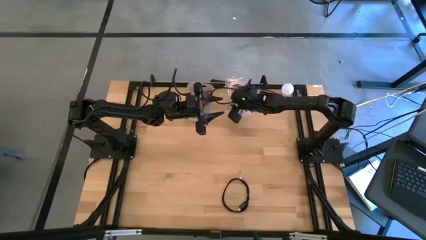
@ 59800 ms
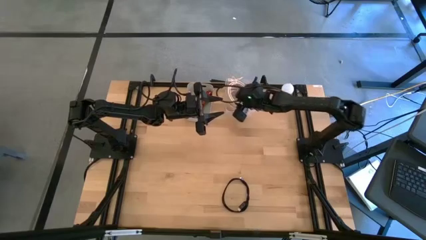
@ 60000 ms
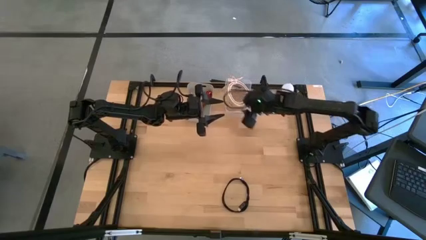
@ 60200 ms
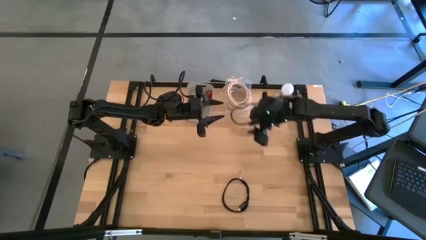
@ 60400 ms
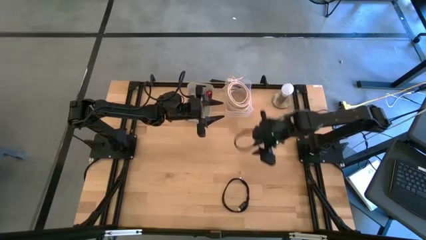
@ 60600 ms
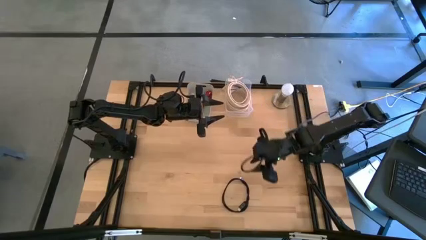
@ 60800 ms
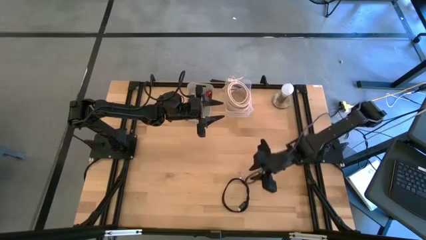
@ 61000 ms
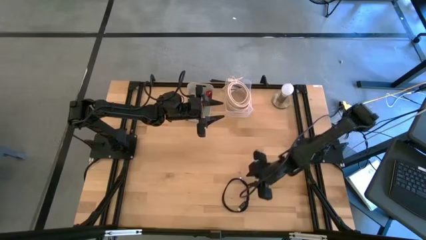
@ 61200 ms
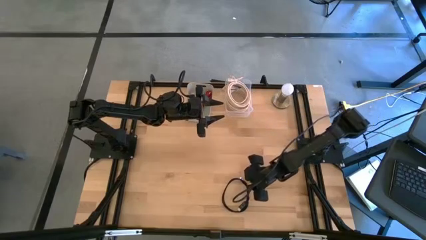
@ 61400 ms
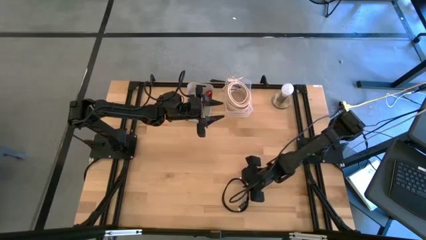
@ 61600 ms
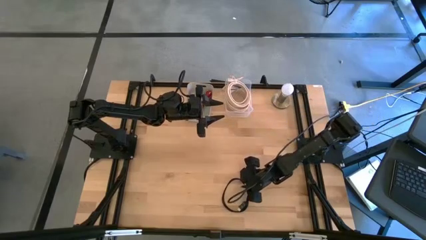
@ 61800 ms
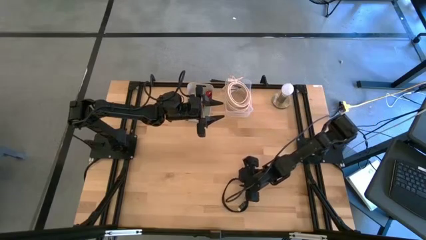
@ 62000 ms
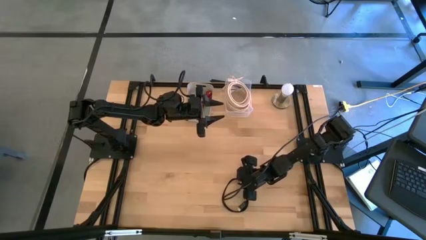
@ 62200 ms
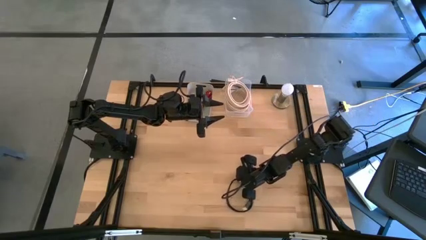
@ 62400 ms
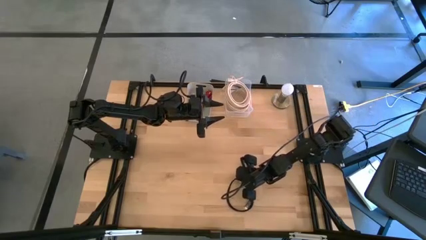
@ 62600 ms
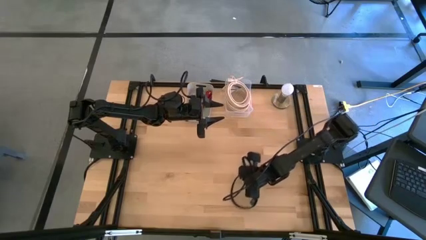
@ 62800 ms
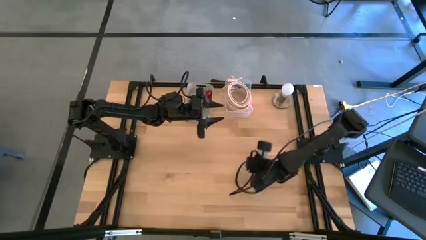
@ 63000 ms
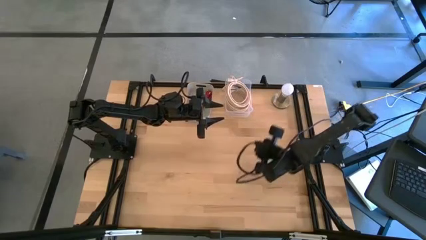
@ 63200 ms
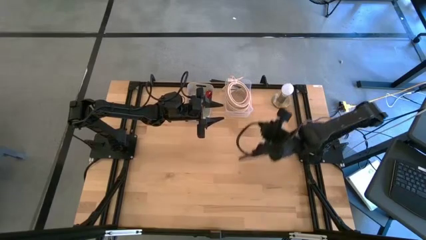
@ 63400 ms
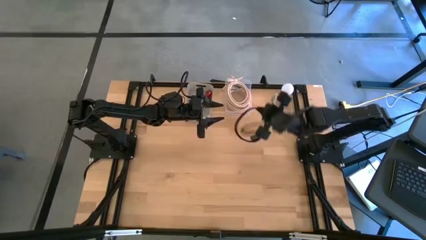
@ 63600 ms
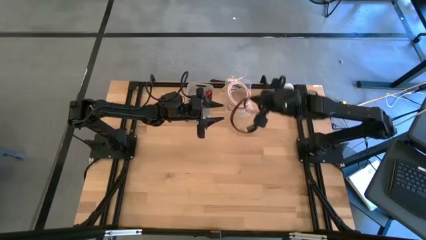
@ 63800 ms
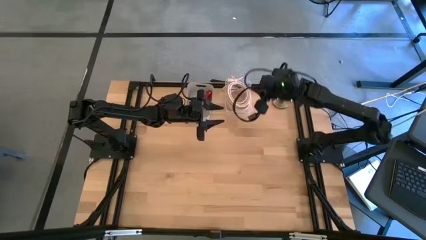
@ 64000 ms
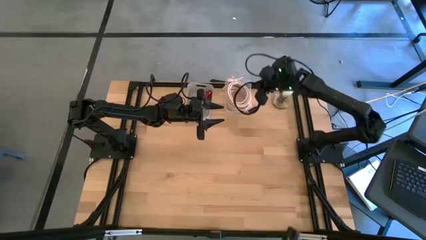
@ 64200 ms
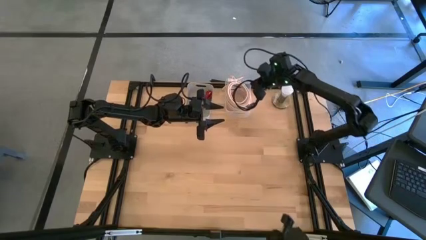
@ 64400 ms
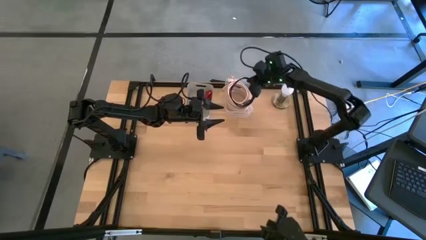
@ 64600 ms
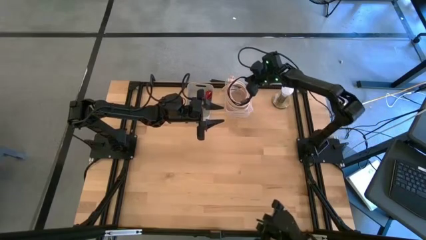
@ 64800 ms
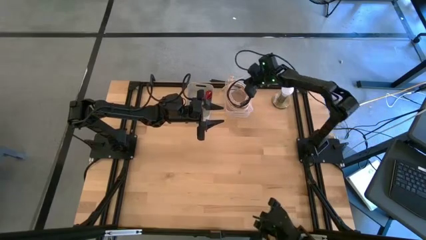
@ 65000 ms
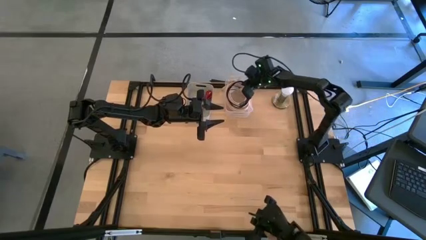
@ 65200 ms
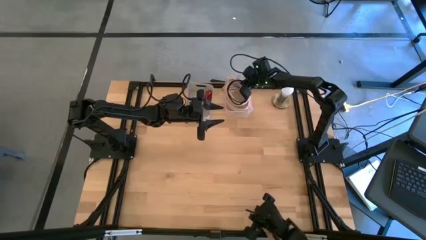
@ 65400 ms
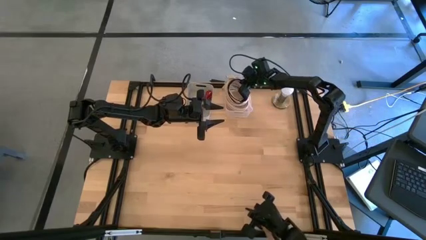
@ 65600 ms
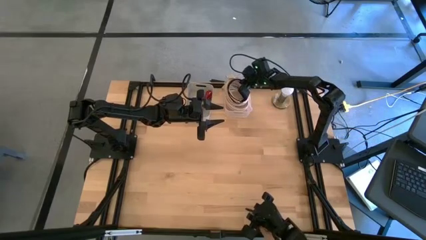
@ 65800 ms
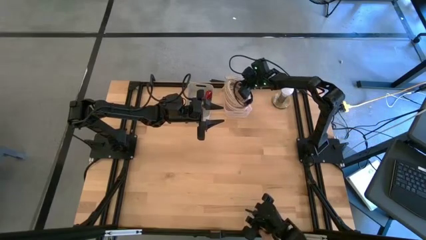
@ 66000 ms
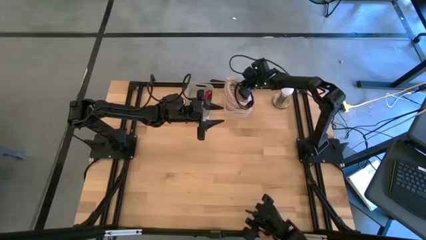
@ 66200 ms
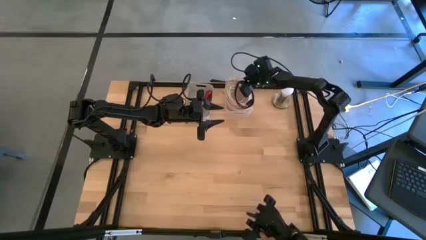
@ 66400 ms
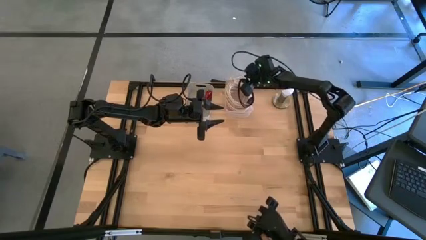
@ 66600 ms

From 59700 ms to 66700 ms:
Task: Pick and place USB-C Cables
Put the black USB cable into the transparent bin

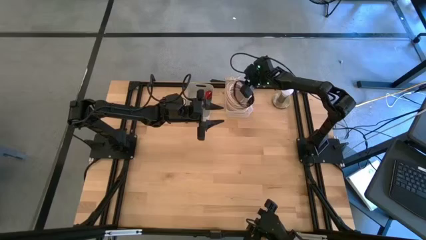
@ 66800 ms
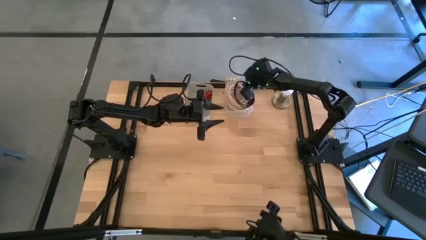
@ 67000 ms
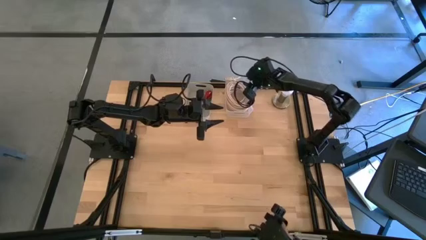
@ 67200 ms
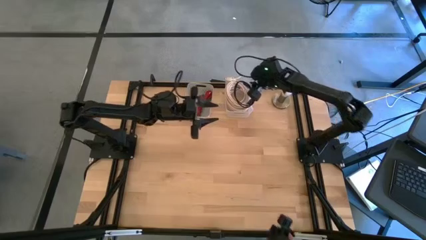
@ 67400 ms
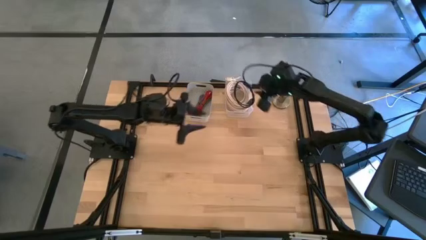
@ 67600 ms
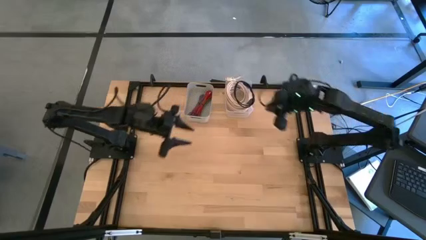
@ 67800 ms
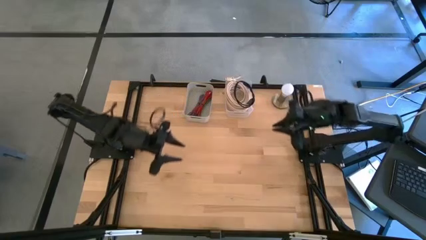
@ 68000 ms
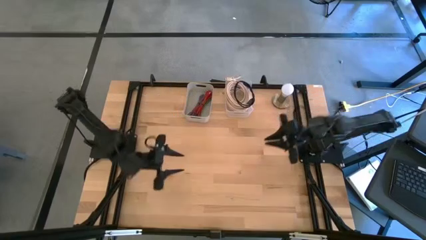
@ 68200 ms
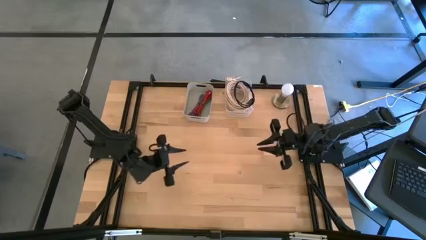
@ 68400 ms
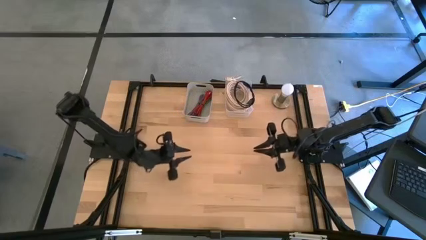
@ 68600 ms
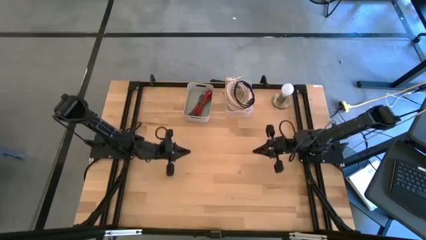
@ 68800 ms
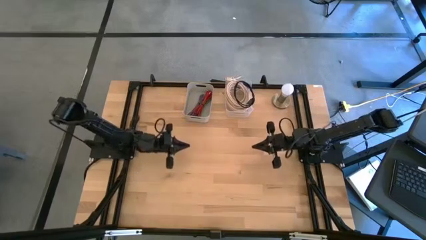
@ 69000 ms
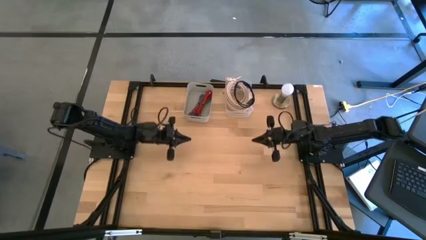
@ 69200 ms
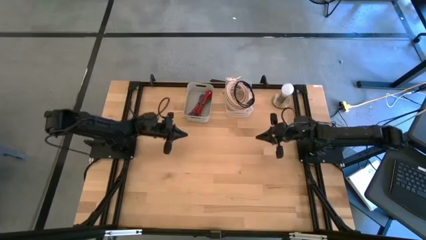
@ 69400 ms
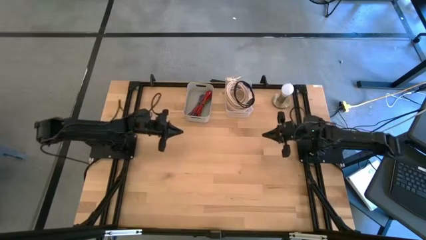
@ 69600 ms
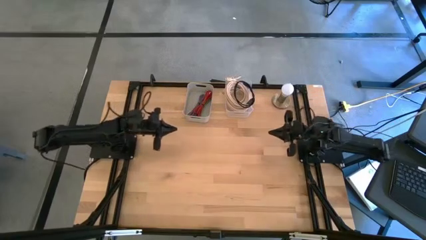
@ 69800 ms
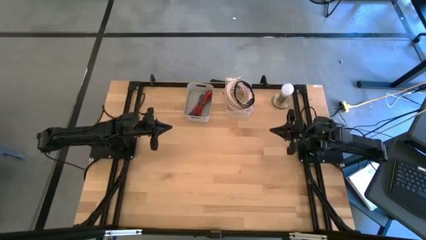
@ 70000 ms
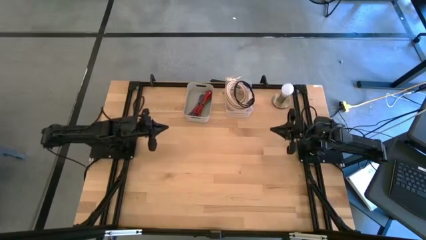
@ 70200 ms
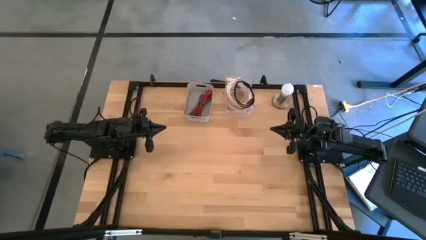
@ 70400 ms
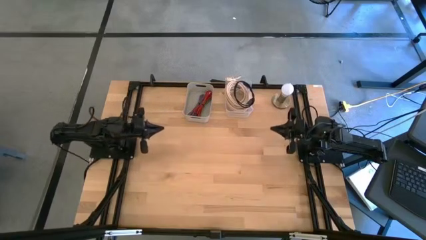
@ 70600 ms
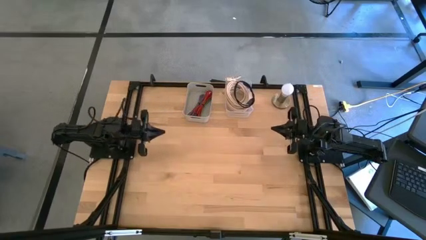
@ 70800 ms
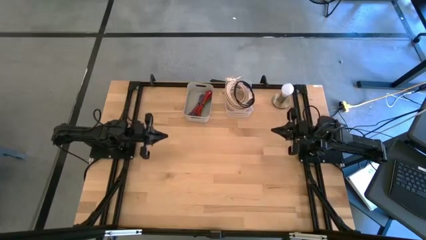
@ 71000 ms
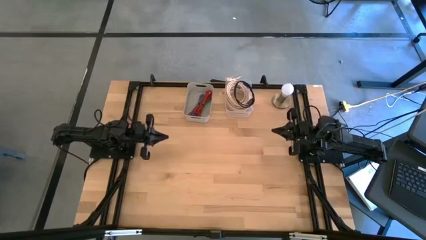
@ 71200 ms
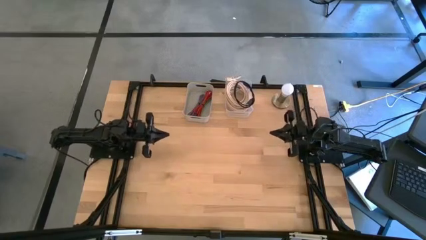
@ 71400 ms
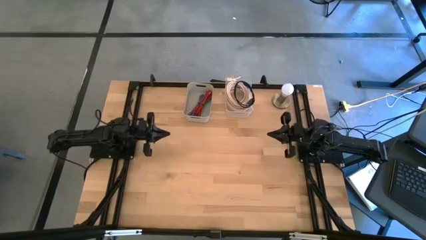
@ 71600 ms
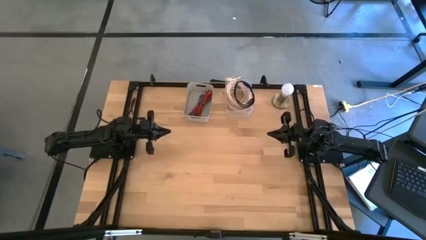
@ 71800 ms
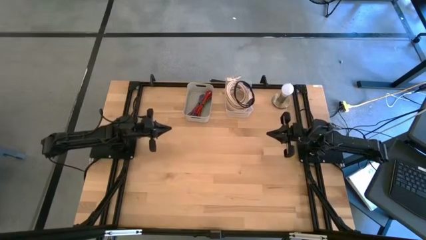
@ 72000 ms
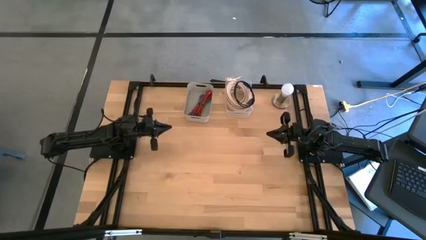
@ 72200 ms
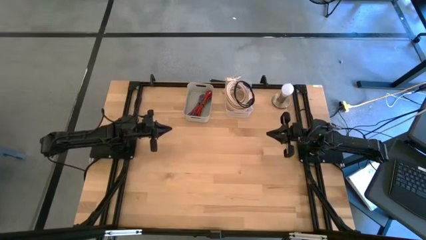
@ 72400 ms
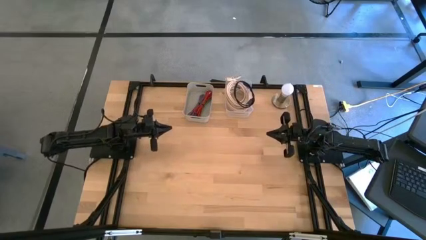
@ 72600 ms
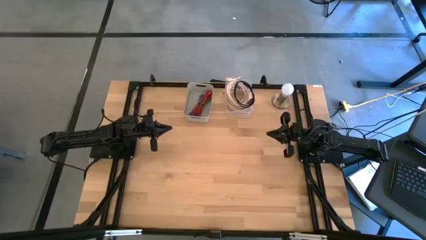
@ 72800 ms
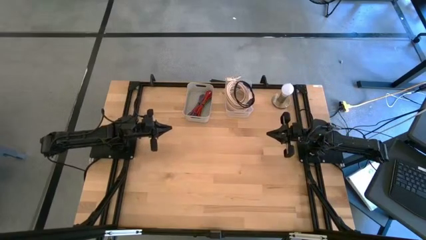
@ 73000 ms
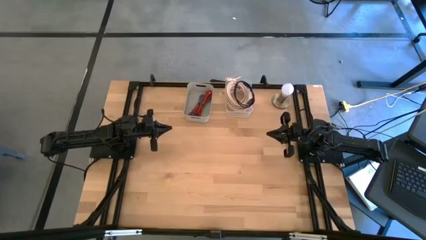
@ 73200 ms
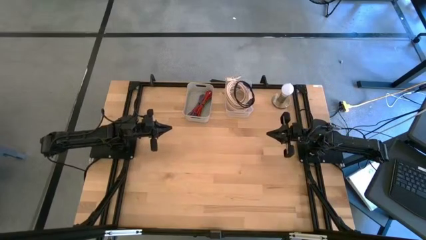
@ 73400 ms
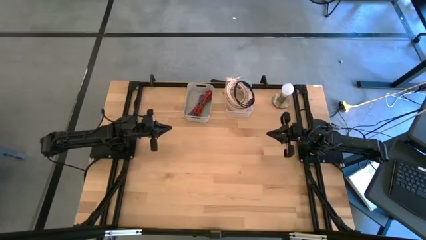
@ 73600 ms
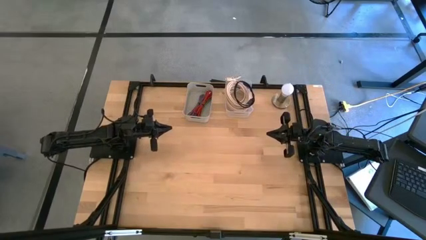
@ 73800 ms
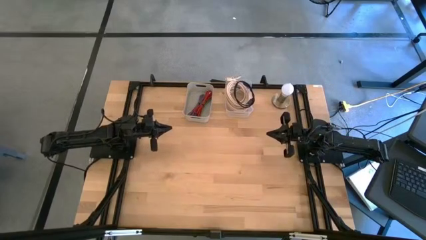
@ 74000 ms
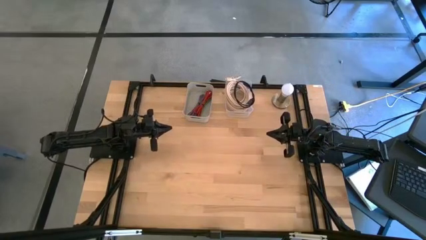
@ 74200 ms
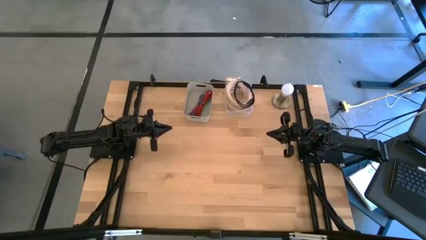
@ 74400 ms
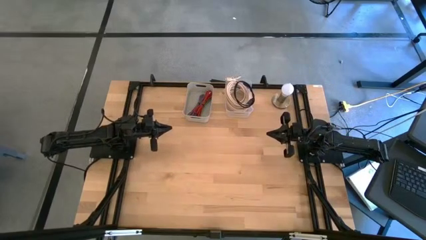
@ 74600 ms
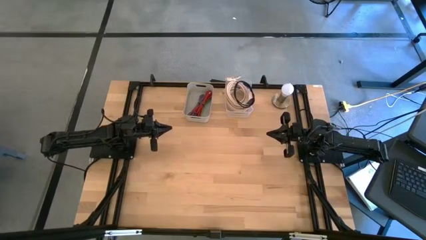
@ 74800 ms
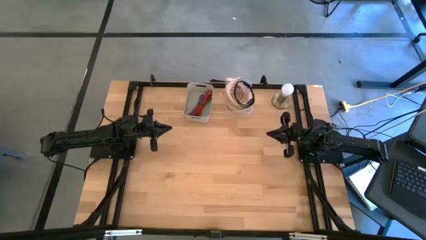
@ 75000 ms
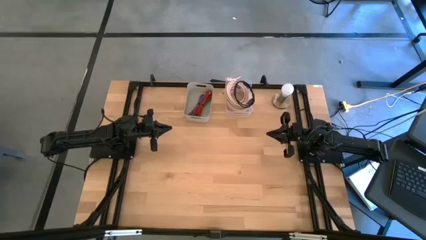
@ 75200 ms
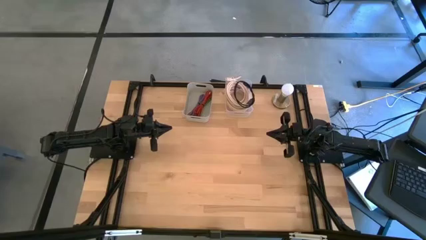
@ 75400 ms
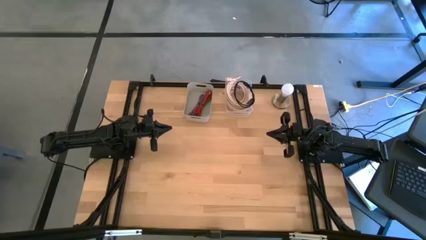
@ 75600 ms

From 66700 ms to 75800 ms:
Return to Home Position
